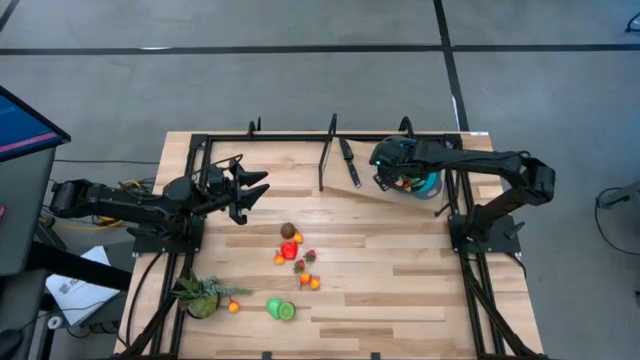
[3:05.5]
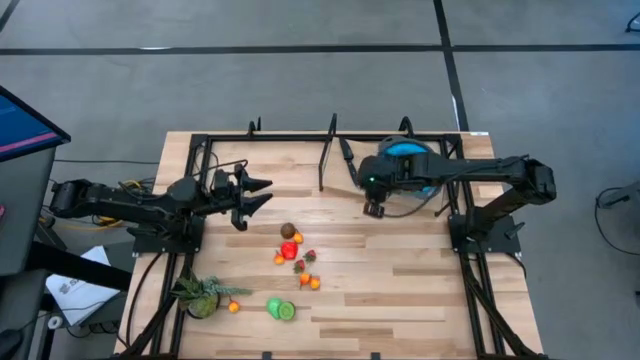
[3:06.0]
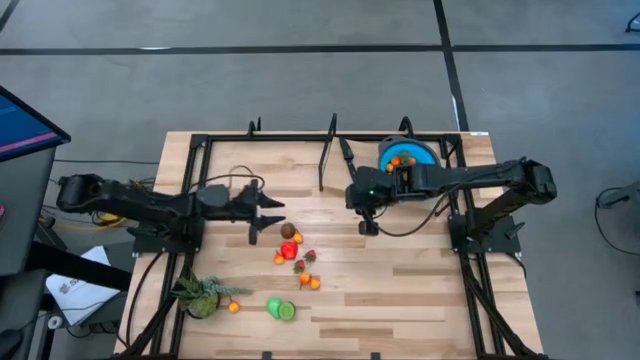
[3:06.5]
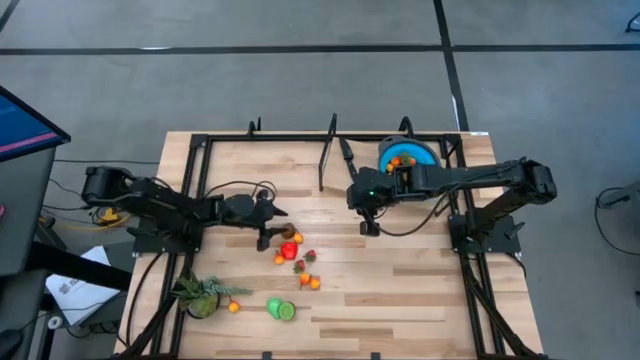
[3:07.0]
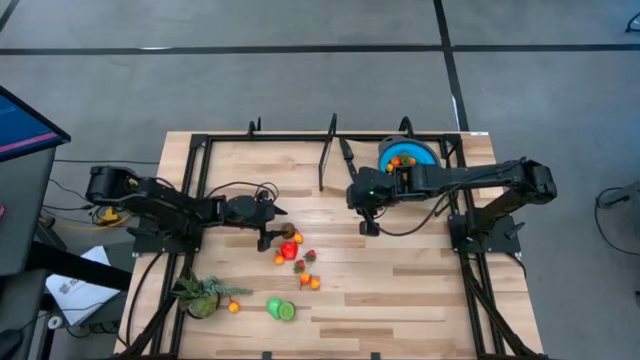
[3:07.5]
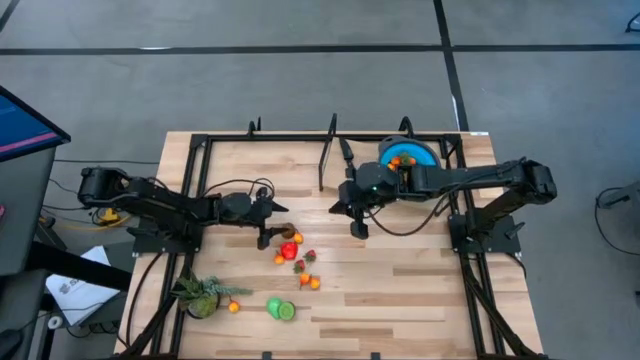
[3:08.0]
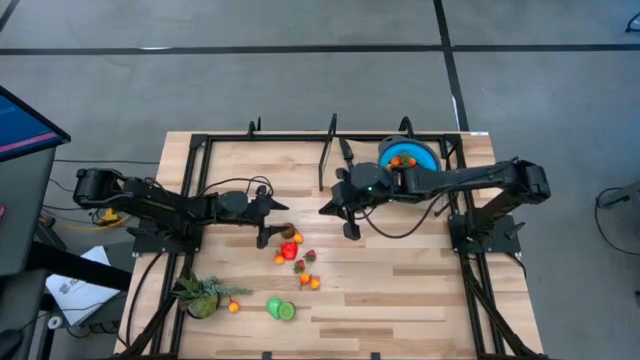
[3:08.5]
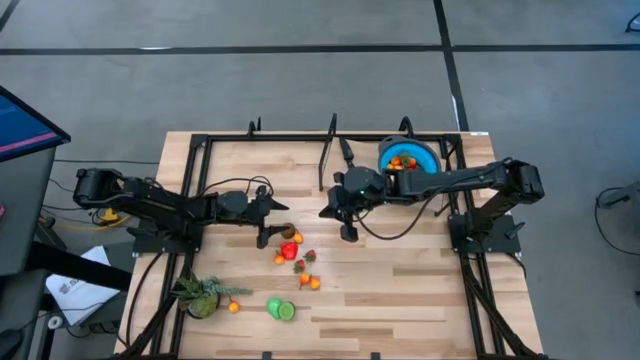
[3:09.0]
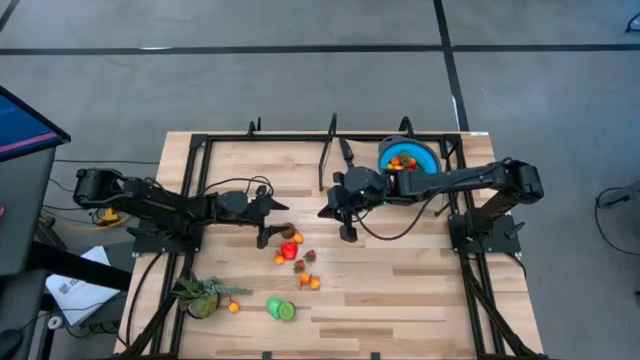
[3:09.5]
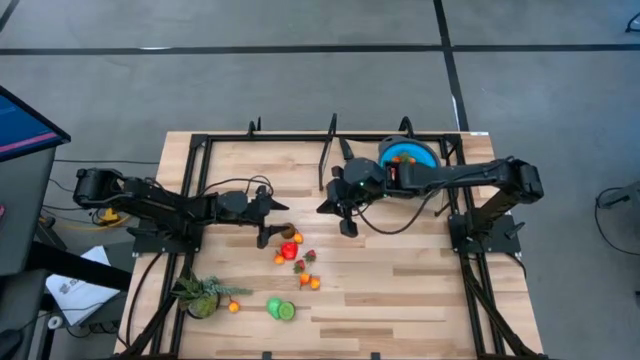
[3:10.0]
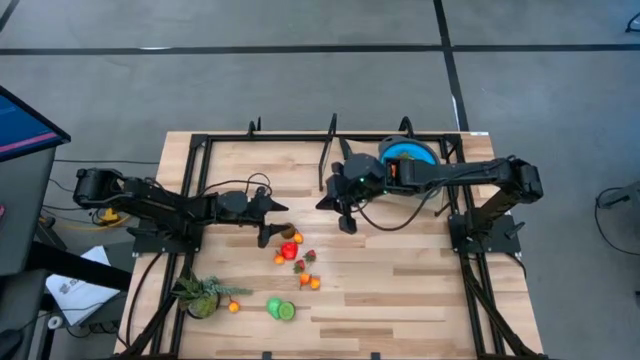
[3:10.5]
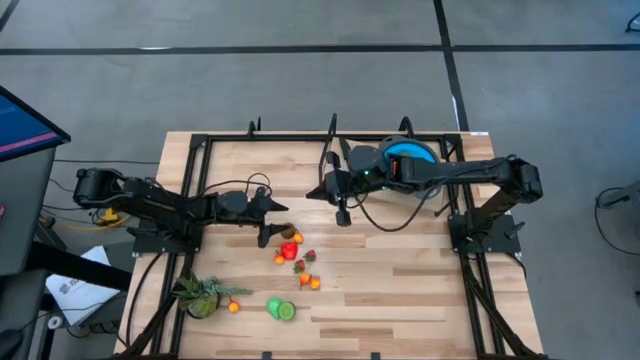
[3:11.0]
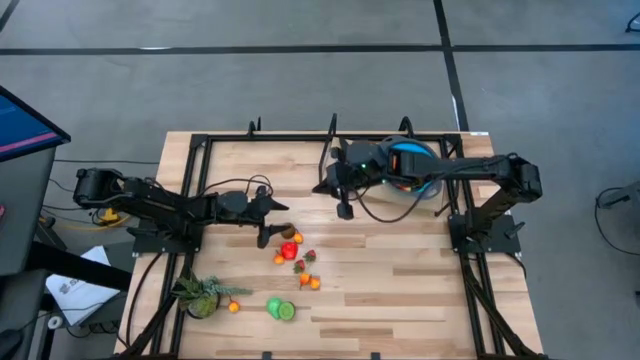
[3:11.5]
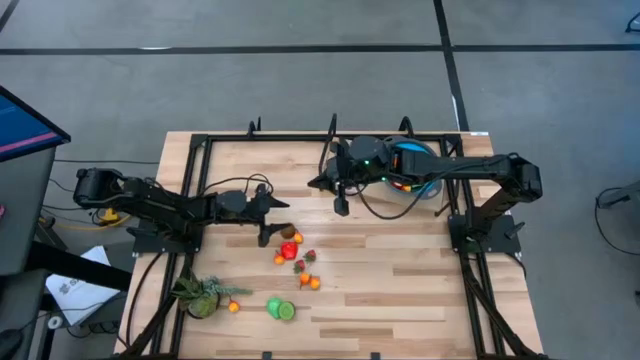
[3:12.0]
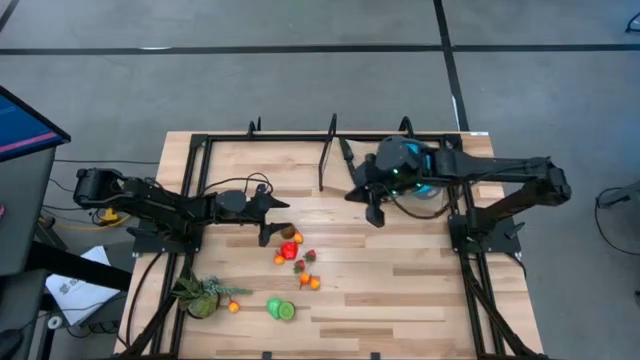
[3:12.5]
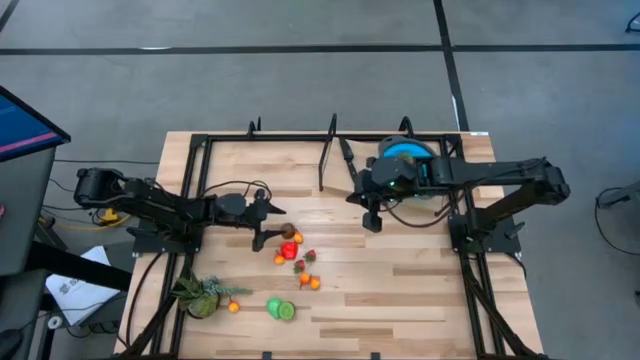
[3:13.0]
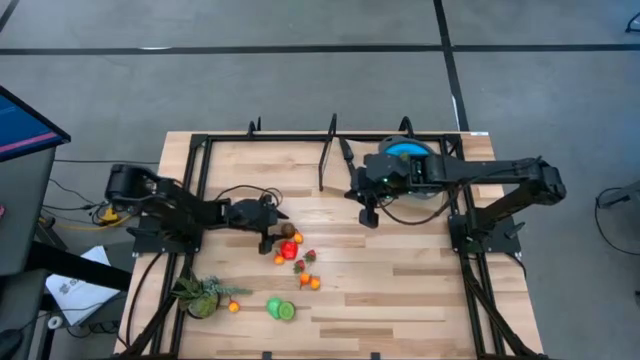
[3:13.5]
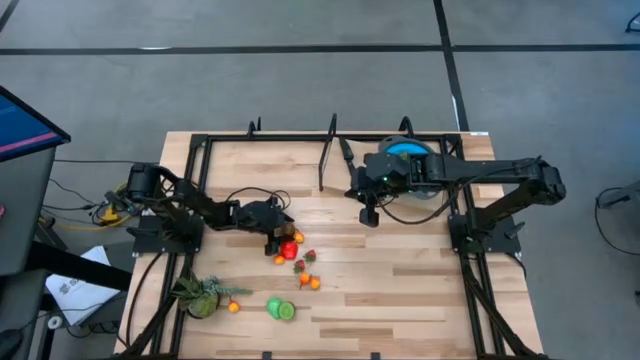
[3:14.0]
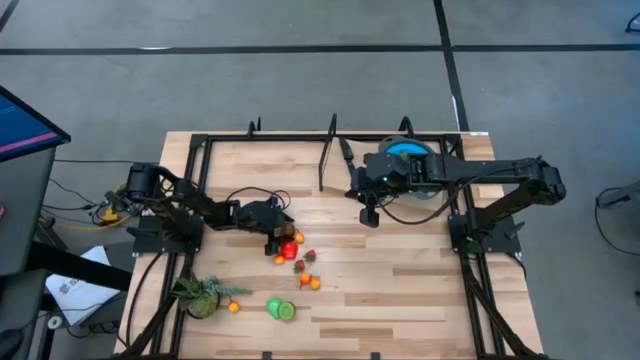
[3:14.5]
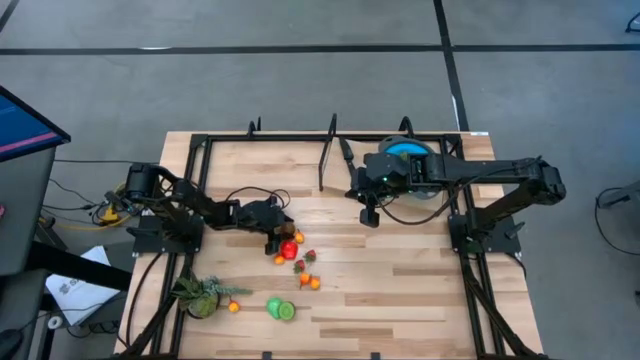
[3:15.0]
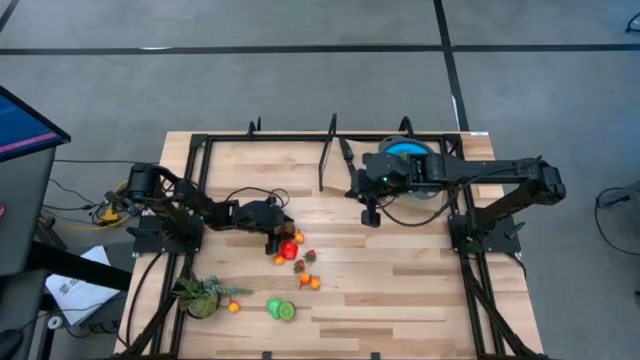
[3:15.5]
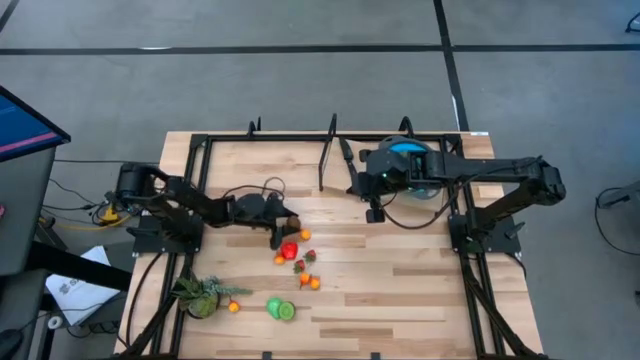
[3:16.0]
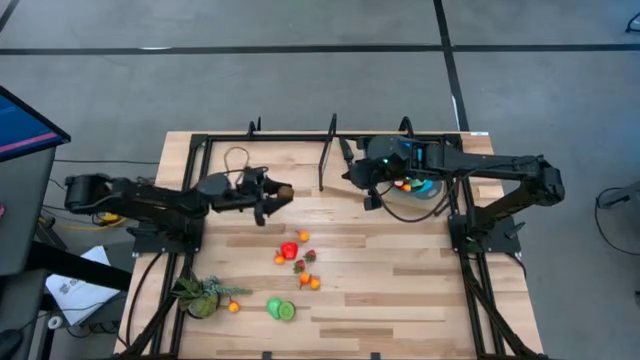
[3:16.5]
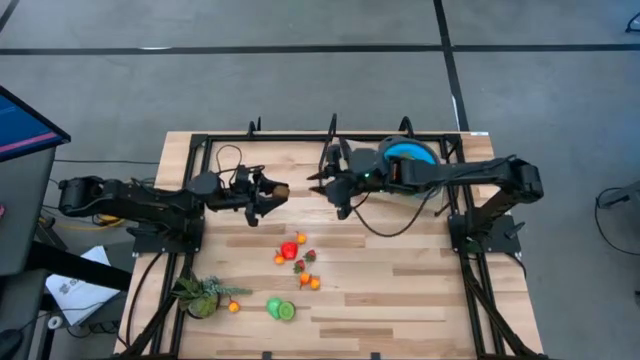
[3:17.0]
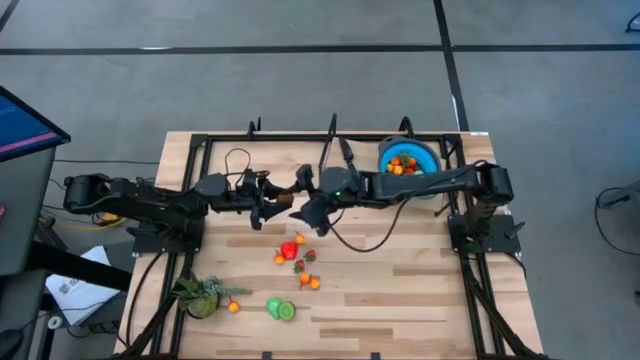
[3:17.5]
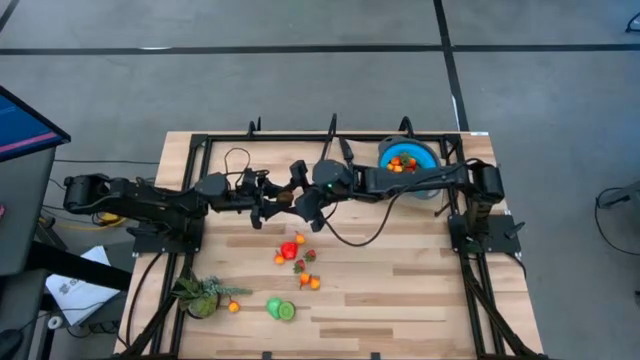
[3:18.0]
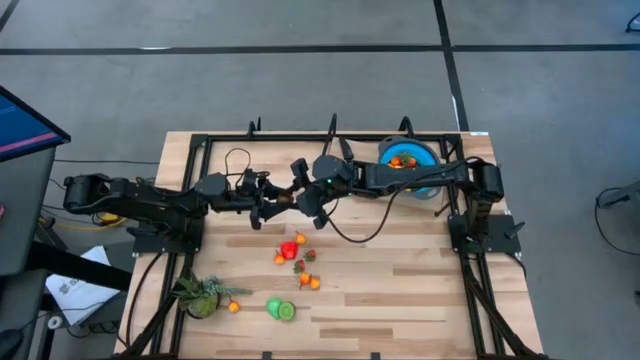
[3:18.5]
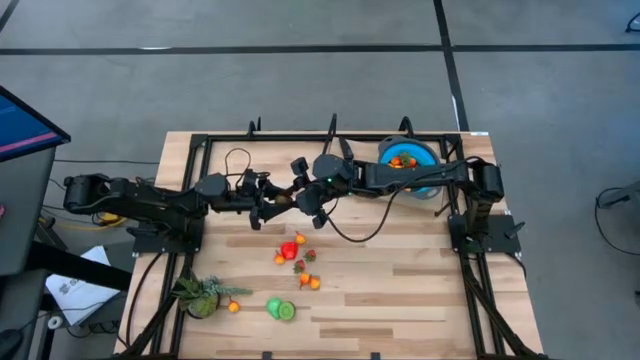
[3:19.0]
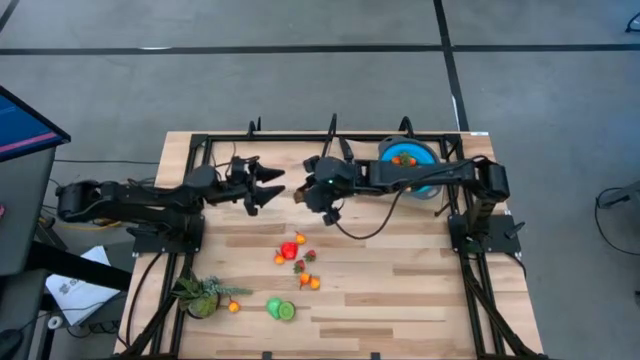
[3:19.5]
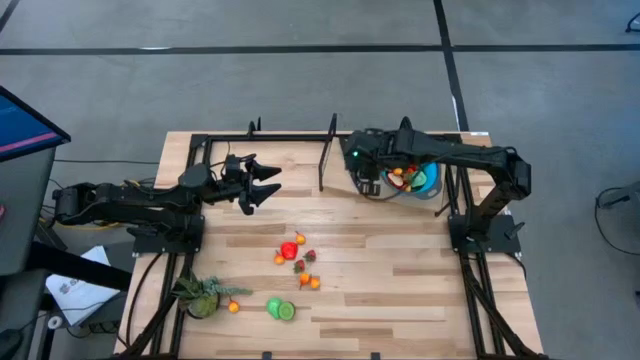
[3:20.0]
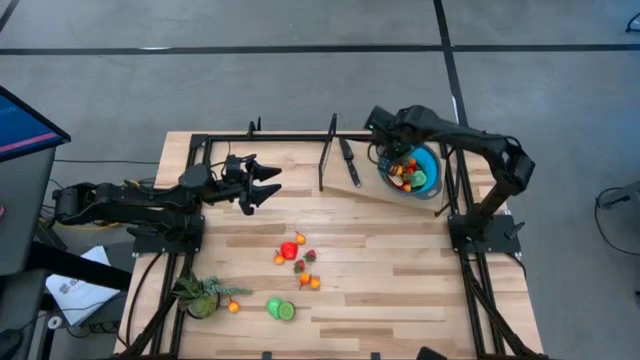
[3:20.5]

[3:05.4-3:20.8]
Task: Pick & Place Fruit
Put the half brown kiwi into the blue colander

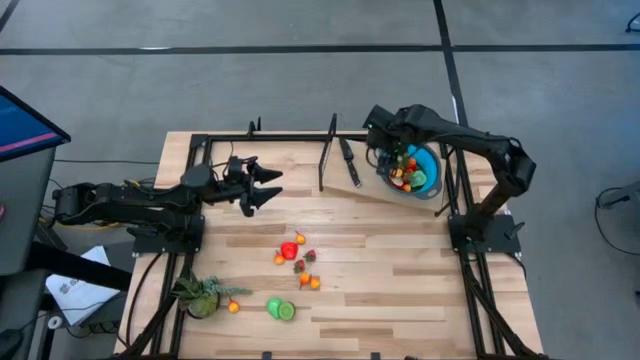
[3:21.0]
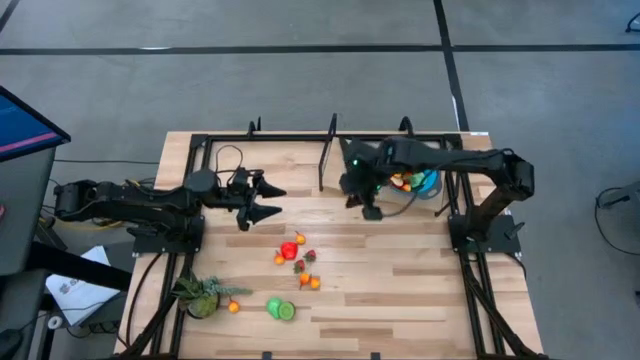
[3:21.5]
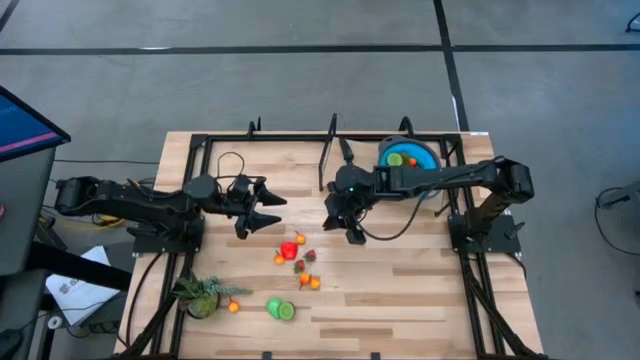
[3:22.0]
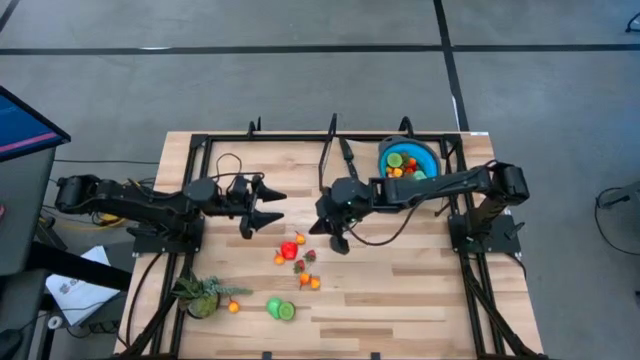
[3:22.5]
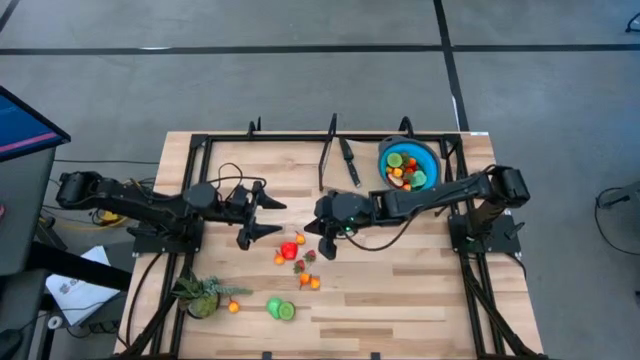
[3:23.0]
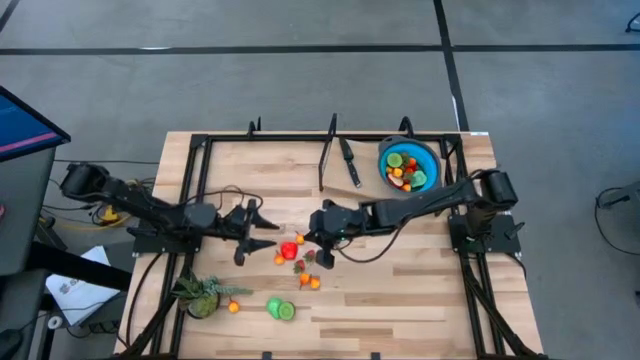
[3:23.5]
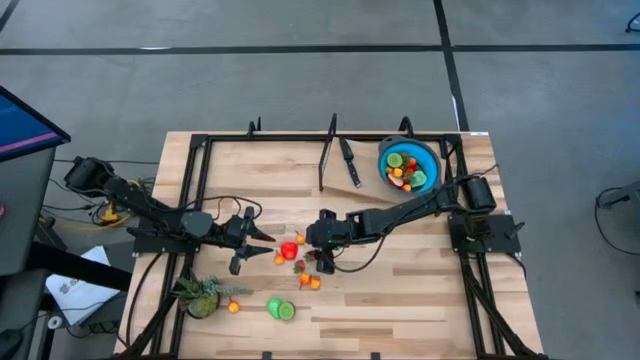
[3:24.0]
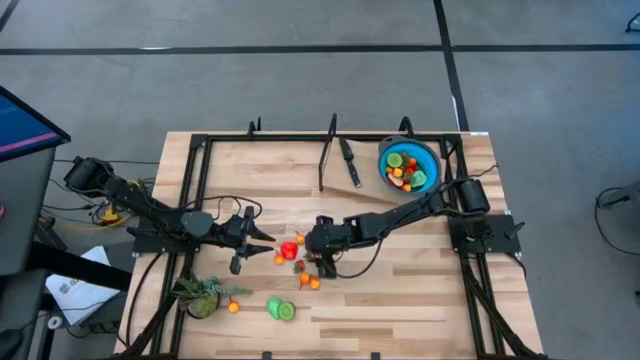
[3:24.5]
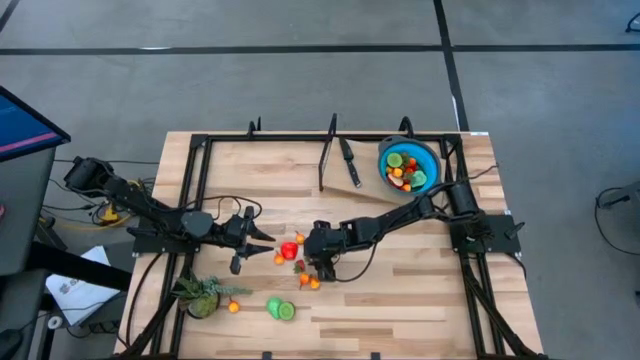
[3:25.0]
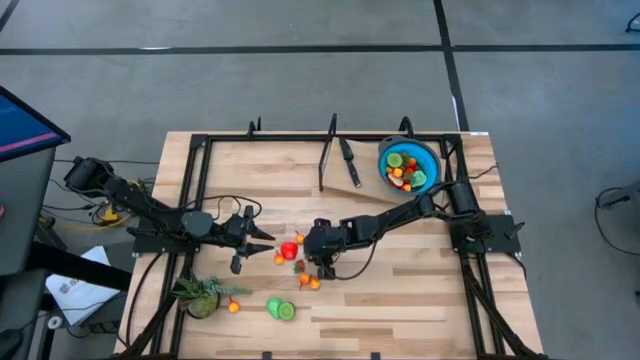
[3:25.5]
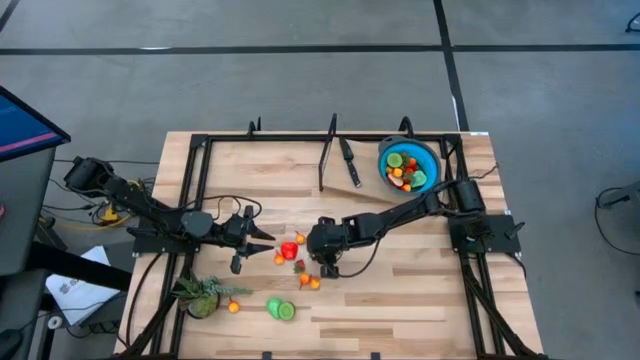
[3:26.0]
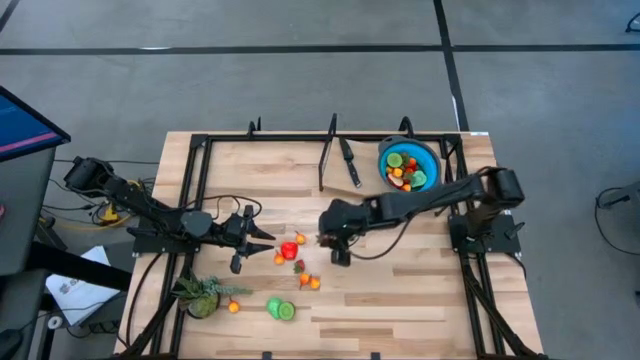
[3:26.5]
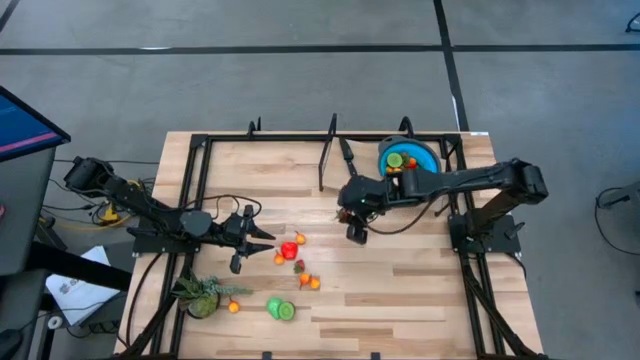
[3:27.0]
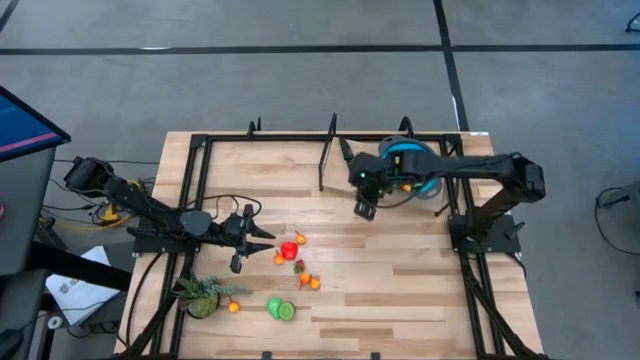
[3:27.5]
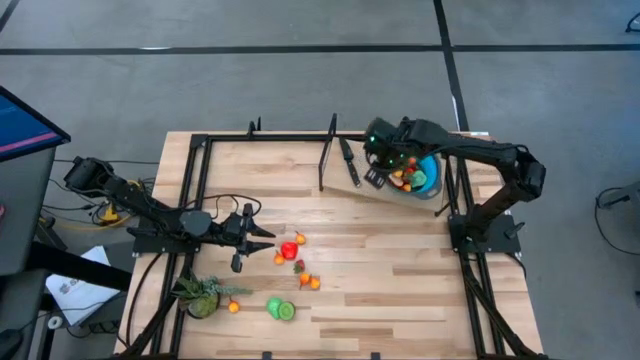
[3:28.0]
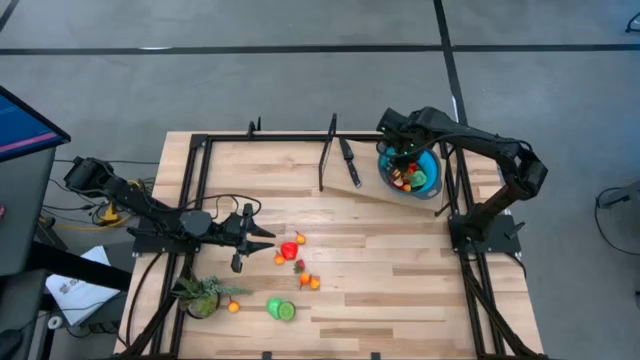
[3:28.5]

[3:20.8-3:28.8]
Put the red strawberry into the blue colander
